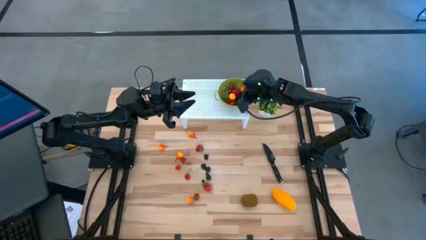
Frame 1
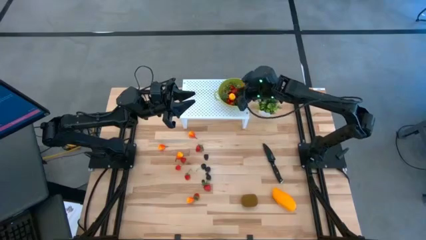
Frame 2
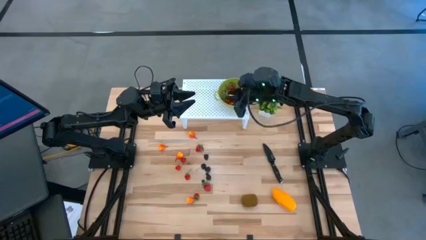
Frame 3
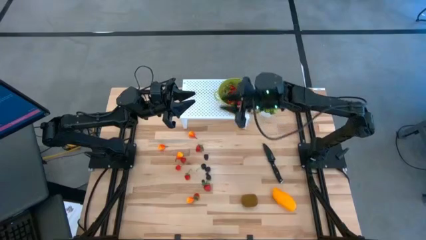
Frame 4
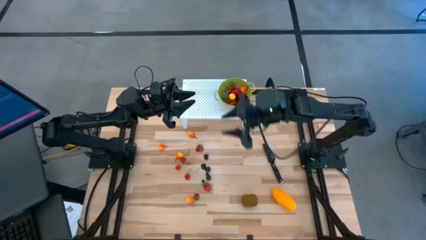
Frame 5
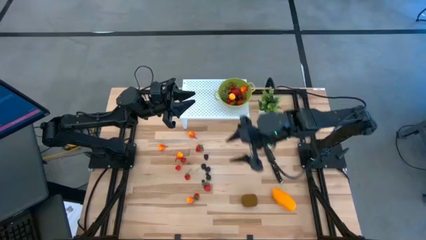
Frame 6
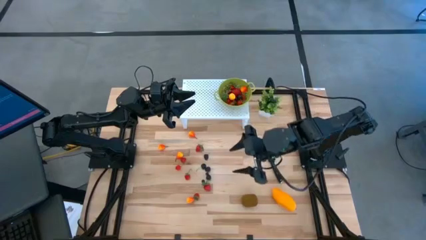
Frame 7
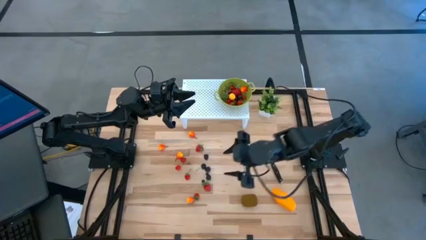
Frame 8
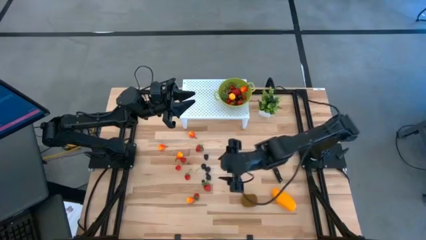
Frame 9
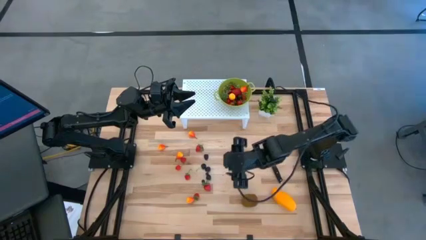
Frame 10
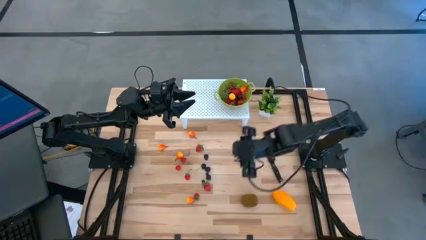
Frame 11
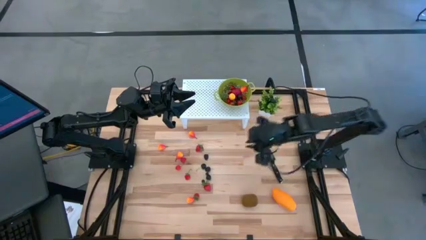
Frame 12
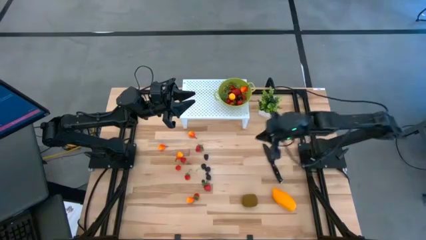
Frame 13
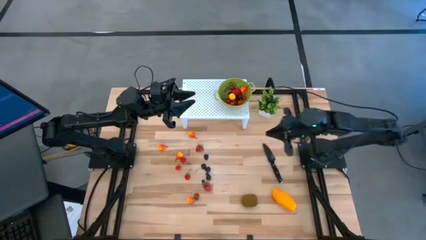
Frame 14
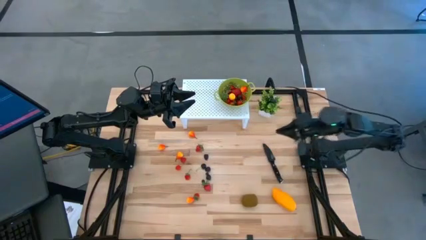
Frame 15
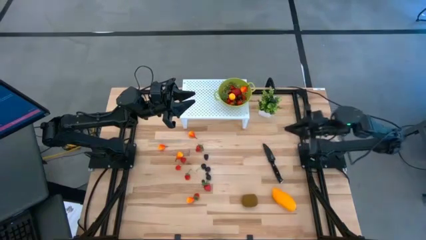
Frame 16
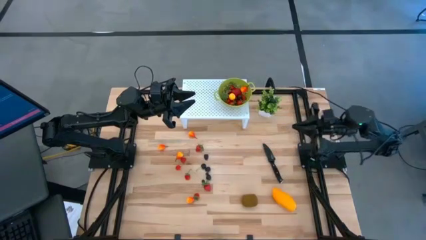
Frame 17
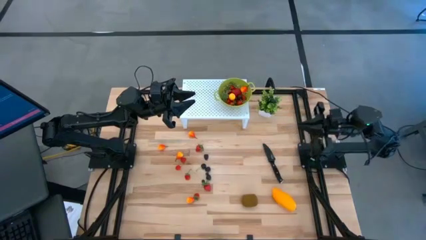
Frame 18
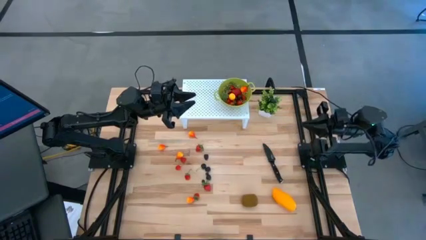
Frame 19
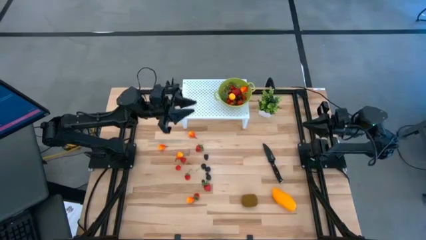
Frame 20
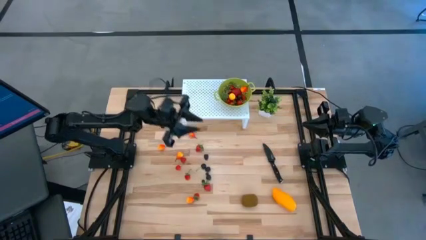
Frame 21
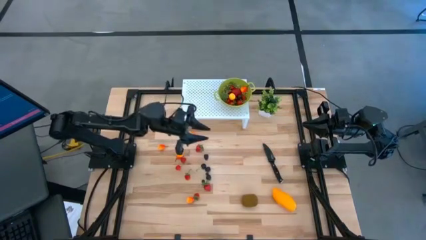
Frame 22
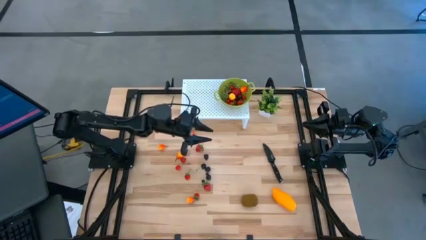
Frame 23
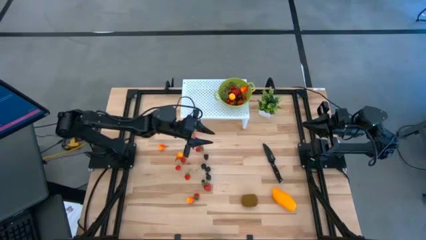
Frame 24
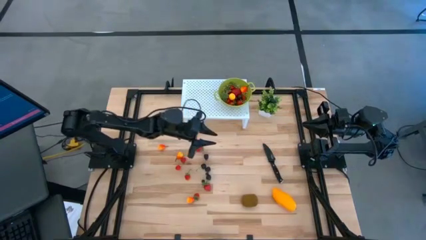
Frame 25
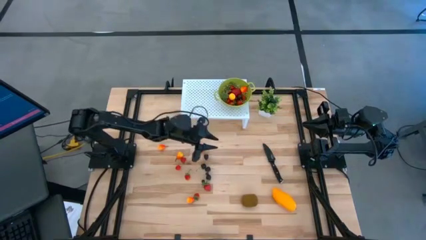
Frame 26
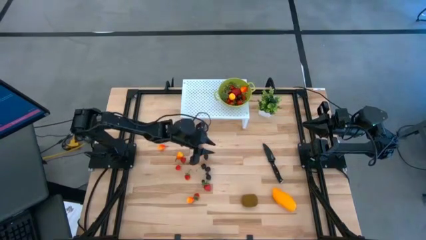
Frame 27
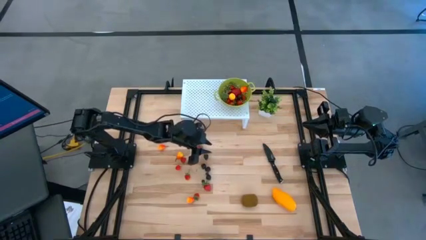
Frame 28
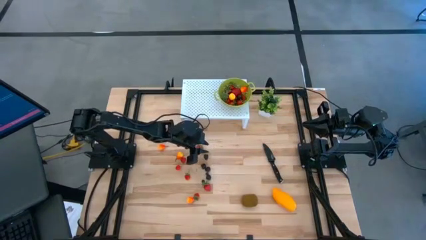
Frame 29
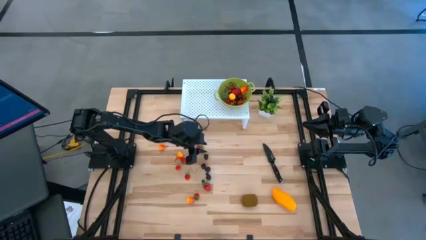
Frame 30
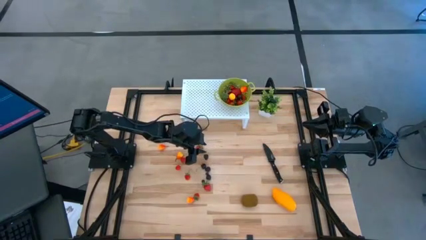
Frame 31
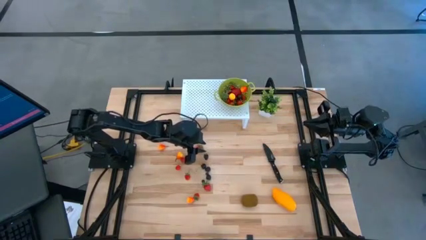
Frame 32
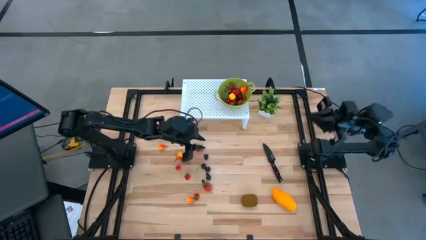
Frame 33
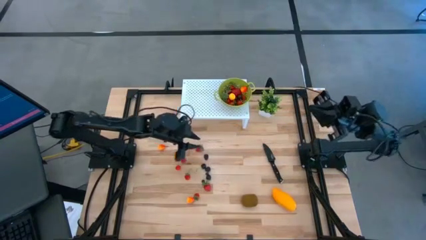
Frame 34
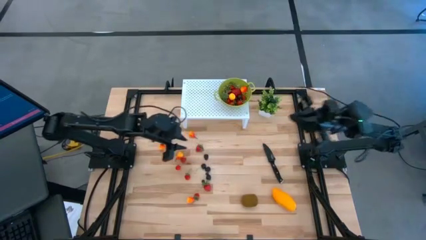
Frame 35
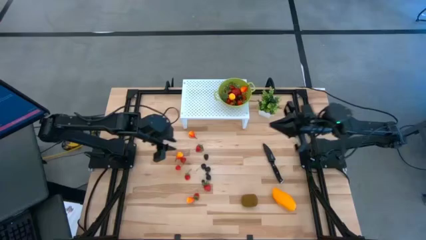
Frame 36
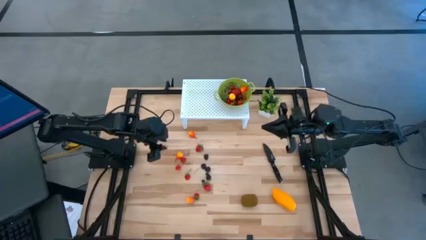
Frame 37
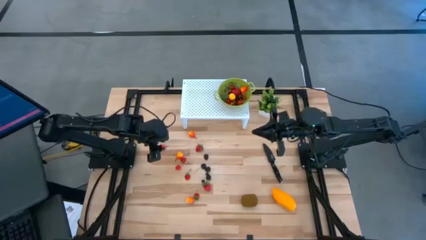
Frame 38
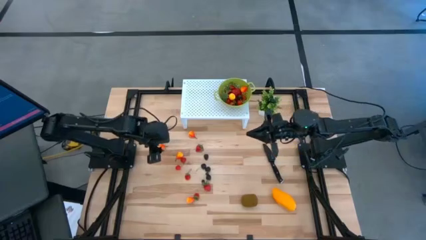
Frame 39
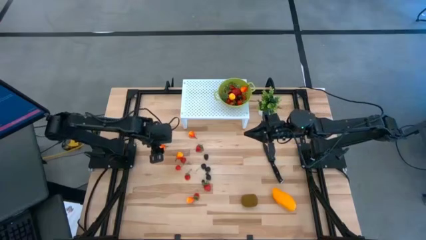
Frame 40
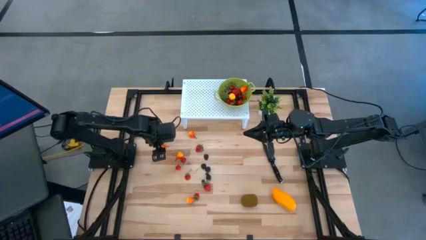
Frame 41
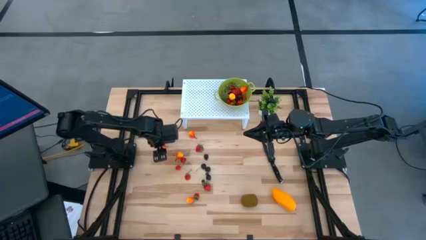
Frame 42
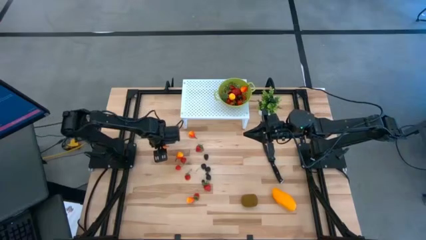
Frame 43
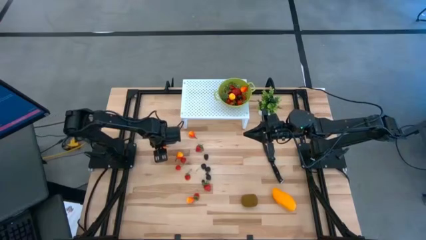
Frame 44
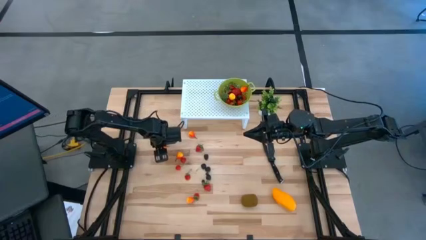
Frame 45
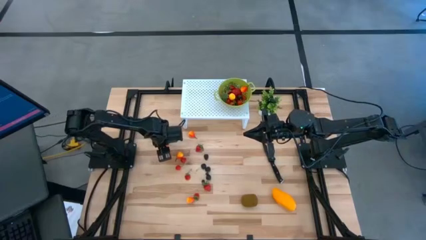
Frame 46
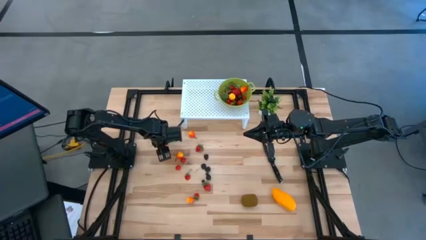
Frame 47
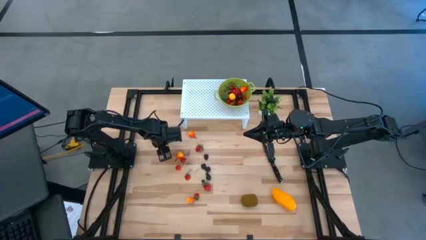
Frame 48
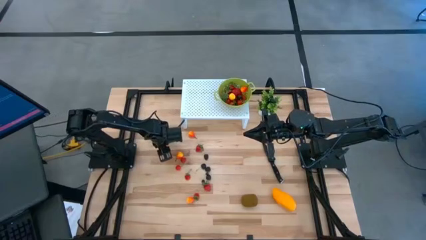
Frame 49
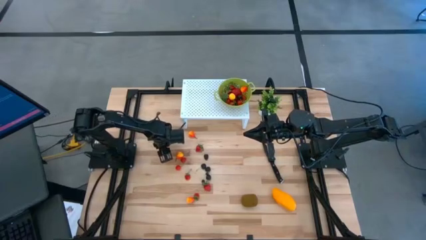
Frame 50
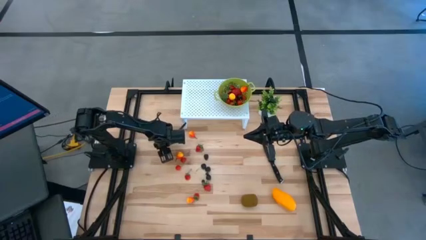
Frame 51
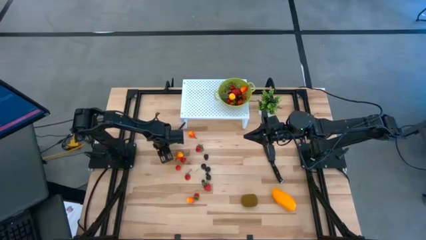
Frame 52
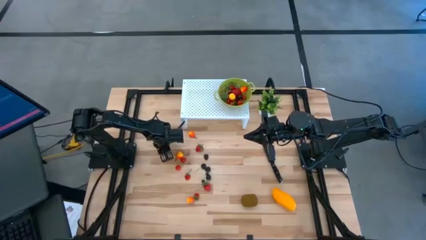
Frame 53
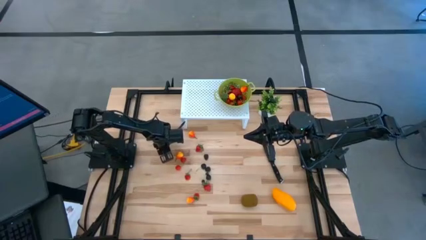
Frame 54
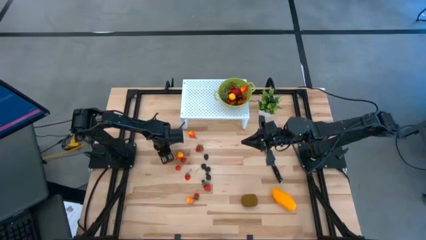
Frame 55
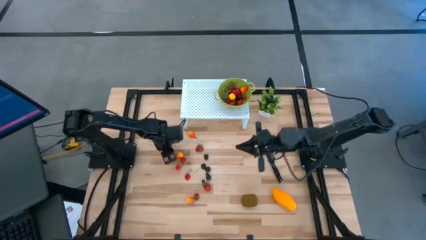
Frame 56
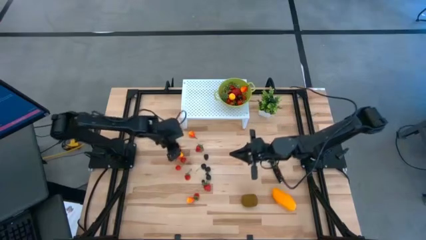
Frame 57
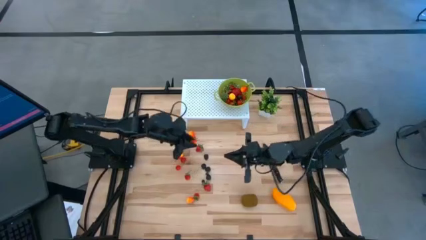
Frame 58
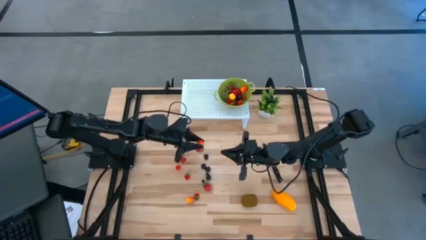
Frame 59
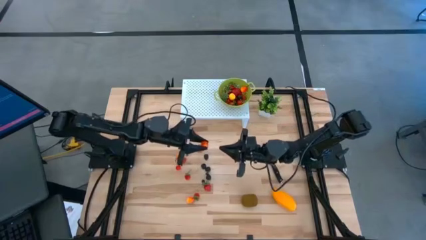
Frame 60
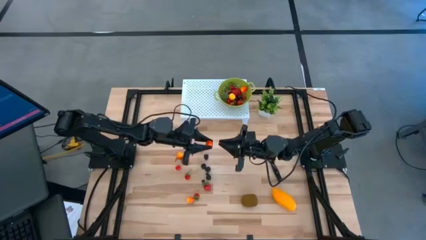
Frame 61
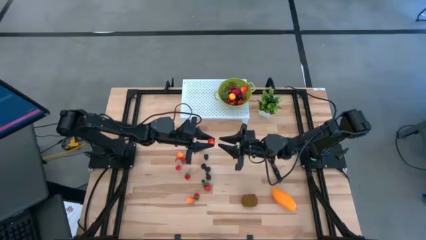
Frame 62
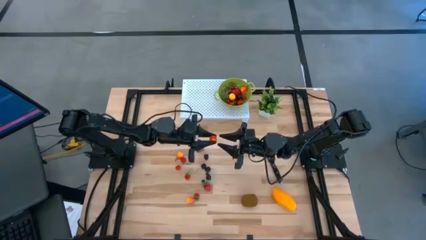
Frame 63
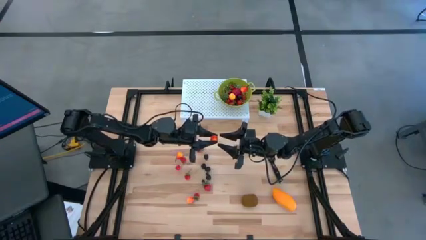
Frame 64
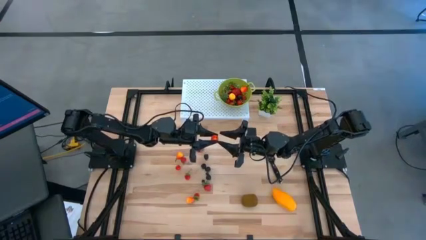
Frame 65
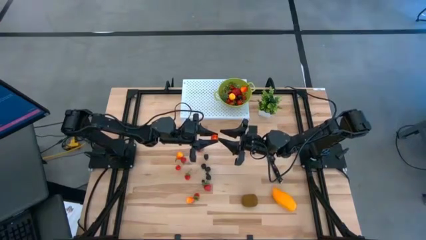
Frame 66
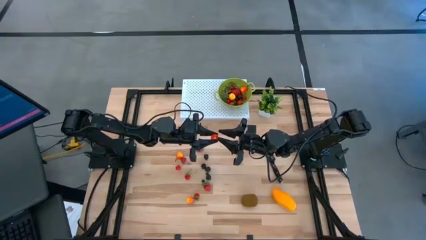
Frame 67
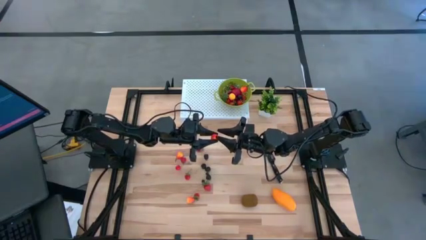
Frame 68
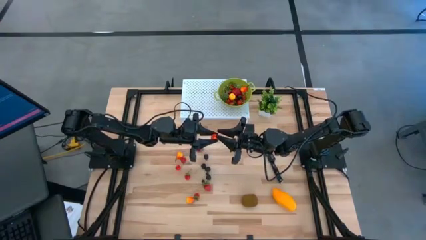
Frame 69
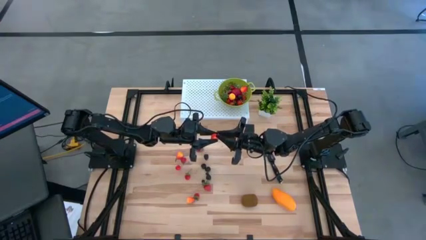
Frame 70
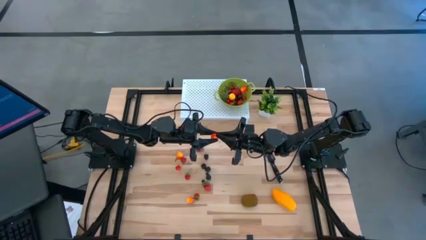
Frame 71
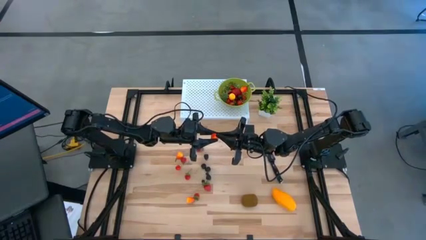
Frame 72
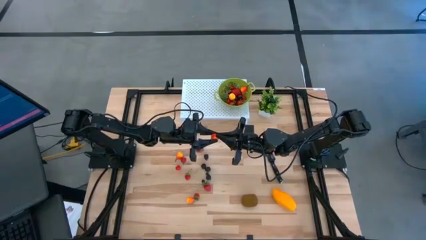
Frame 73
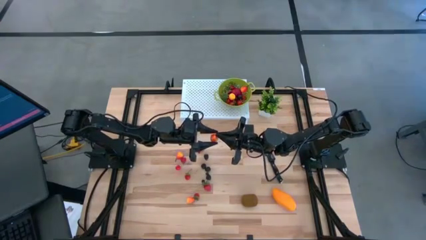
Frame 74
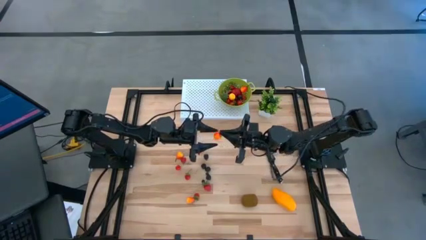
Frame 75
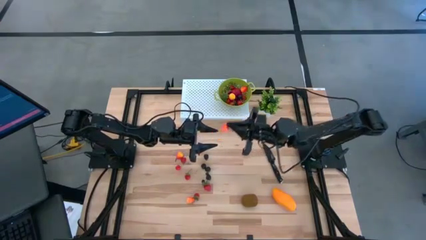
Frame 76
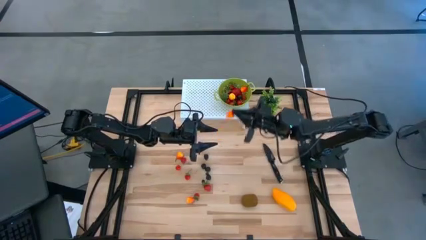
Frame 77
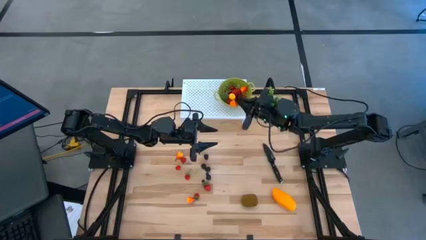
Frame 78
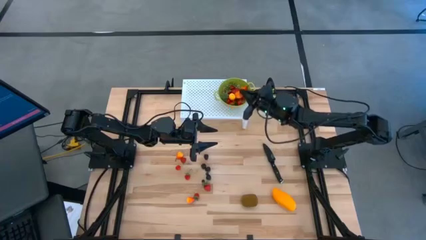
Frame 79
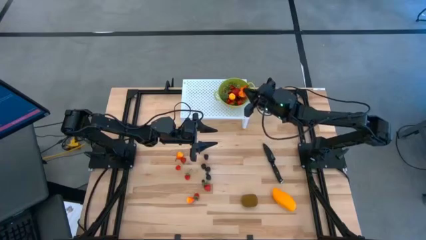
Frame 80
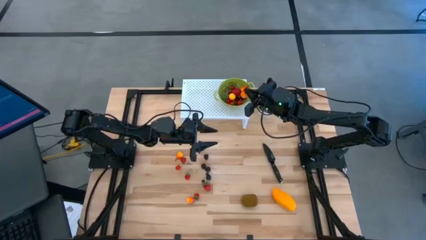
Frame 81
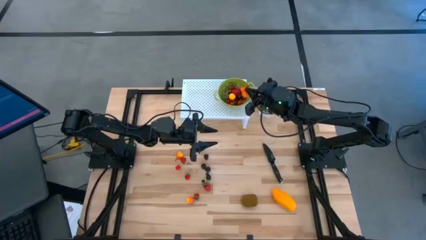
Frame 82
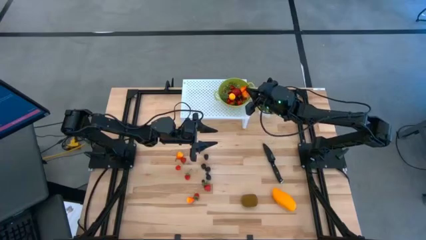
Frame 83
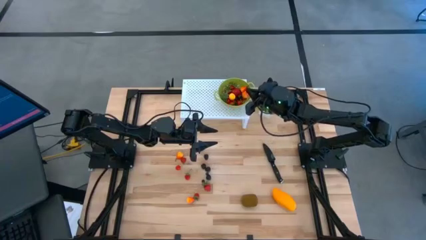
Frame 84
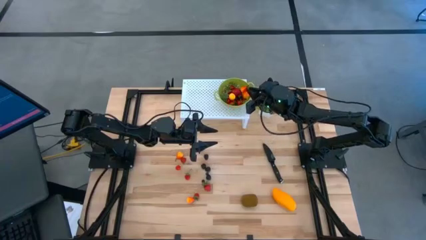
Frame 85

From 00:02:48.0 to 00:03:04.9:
Task: Pick & Place Fruit
Put the yellow pear into the green strainer bowl
